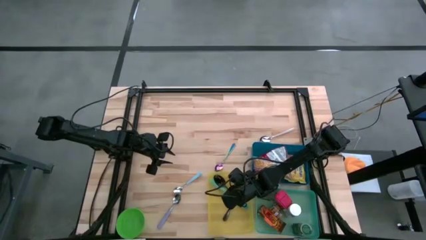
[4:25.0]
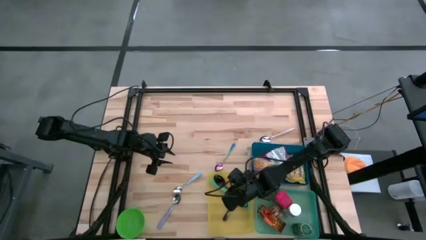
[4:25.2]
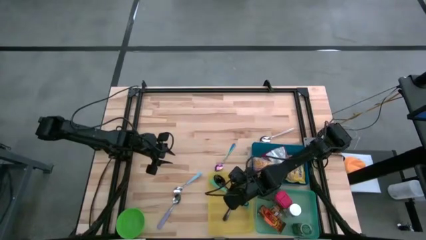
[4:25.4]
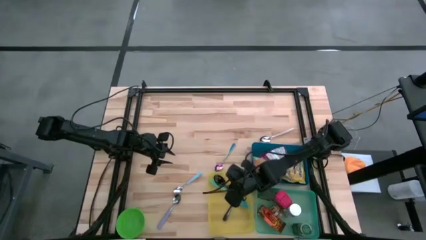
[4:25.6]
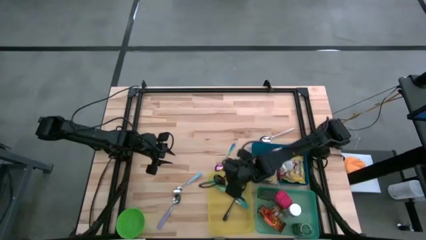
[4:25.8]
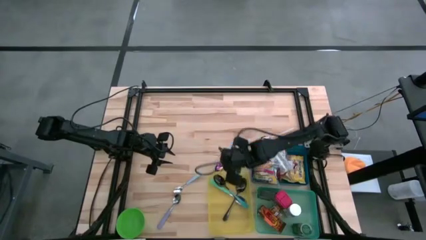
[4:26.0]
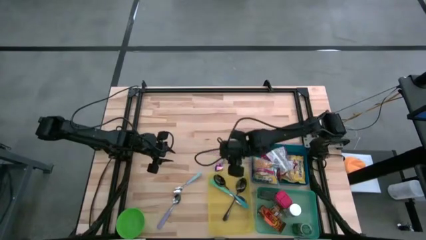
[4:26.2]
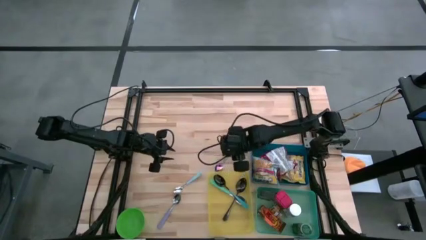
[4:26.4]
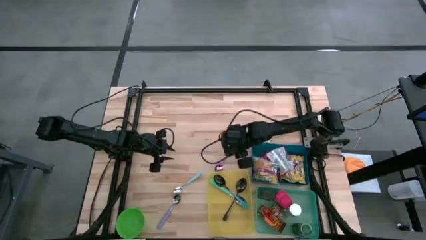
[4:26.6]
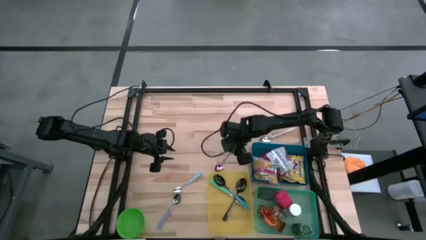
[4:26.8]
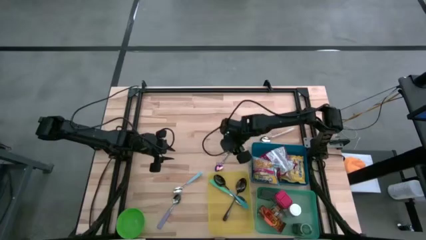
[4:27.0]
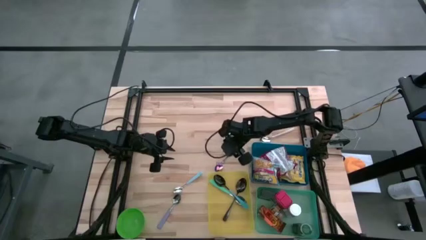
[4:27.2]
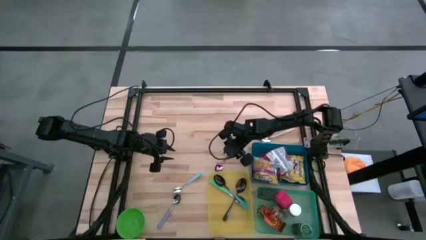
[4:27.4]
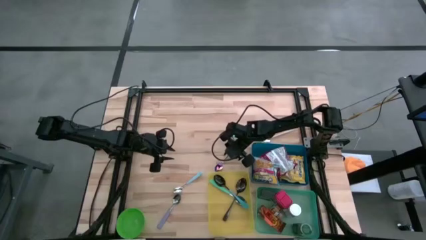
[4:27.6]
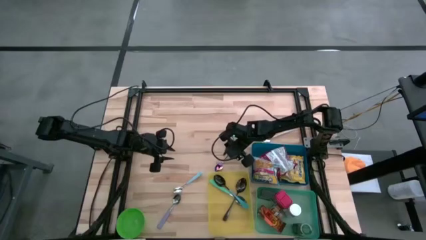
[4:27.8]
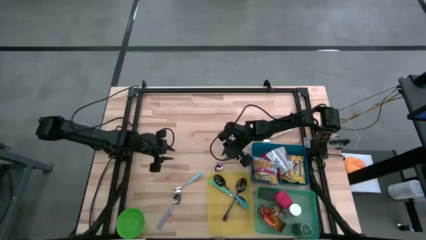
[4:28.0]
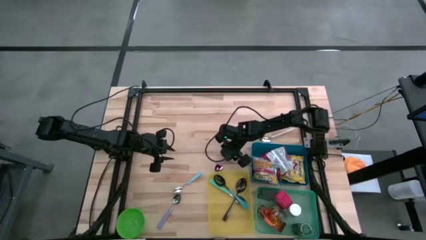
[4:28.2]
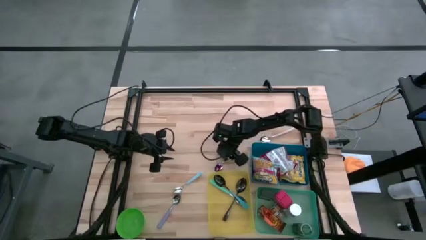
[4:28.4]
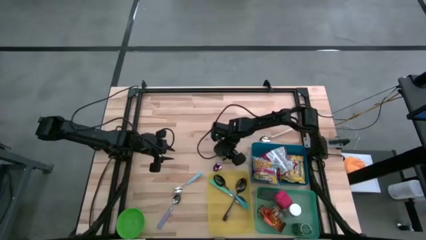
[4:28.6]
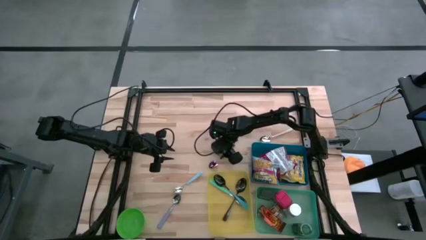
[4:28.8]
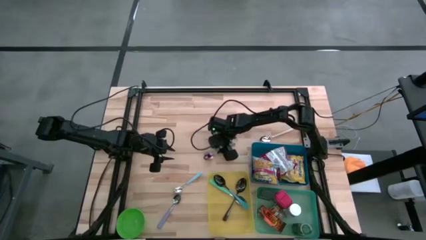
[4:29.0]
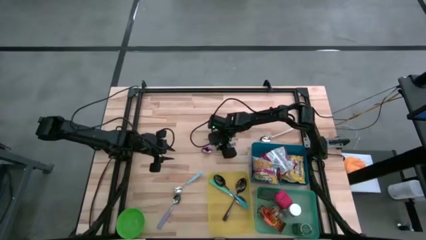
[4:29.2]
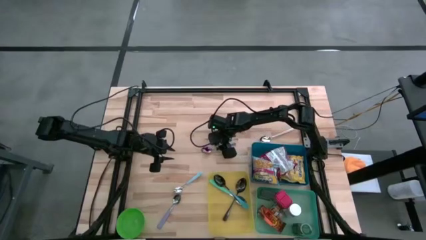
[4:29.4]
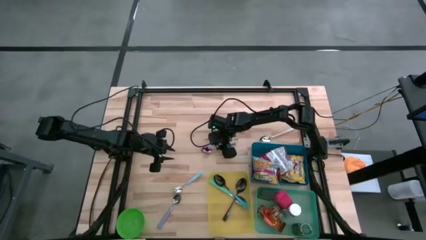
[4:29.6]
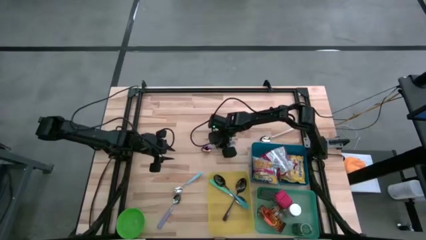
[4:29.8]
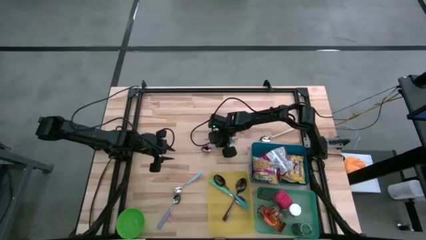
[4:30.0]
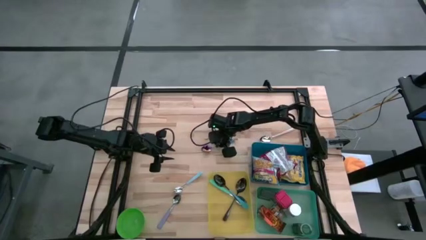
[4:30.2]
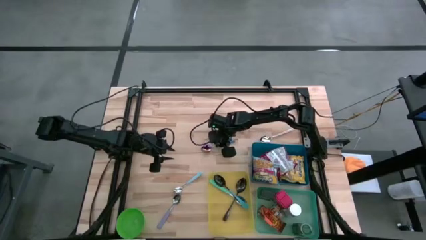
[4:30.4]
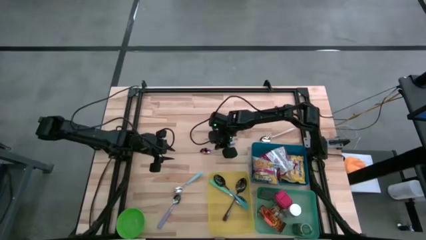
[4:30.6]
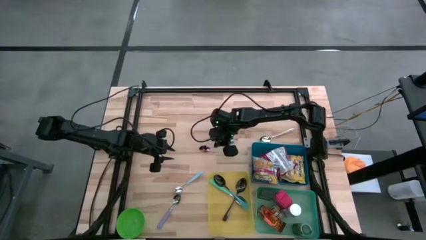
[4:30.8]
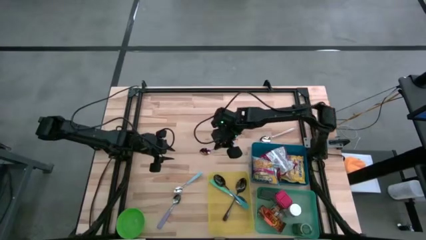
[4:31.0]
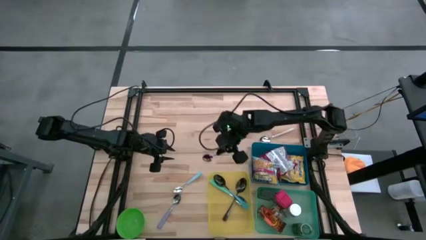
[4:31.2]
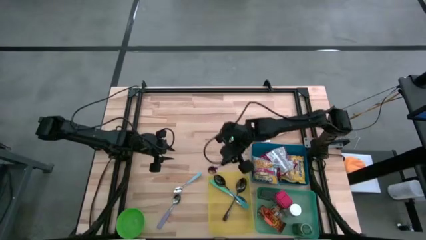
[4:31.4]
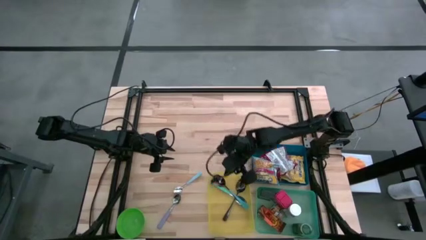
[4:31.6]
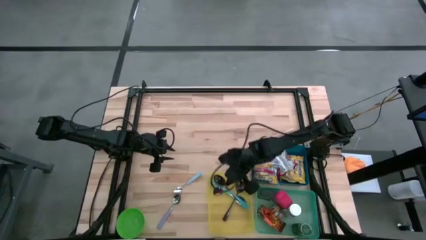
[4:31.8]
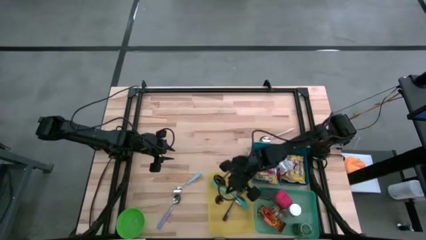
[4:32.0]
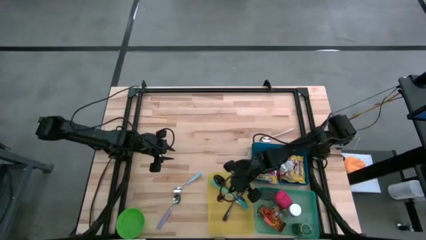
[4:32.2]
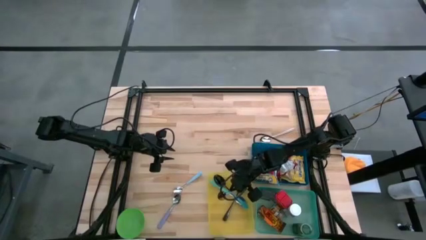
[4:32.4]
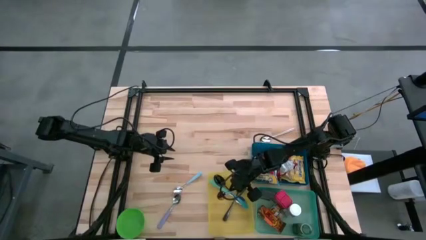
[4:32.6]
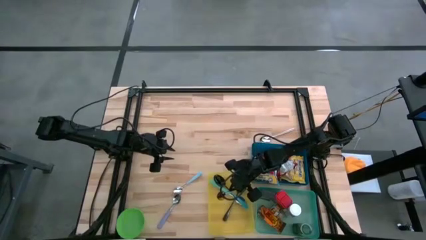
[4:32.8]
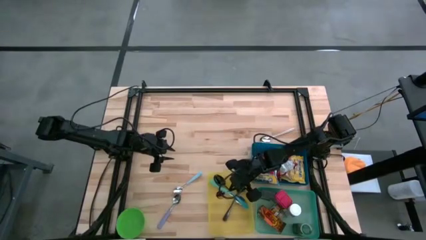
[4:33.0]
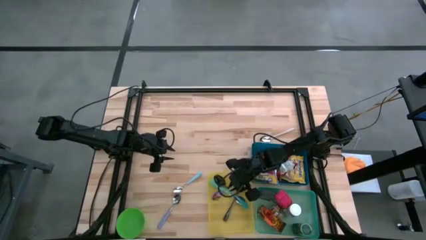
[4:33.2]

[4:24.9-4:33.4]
Put the purple spoon into the yellow bin

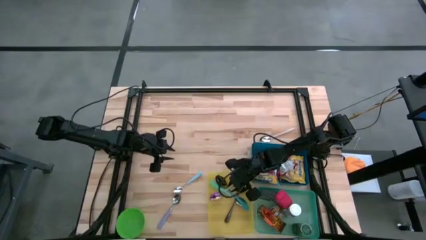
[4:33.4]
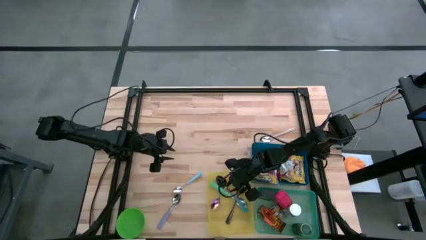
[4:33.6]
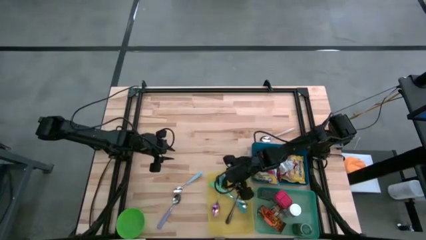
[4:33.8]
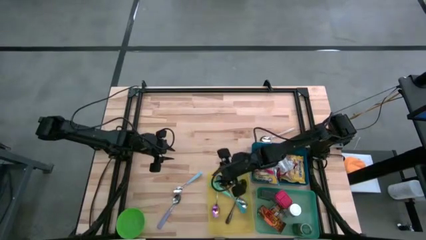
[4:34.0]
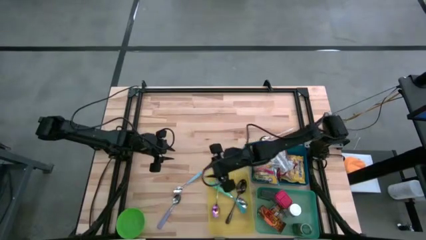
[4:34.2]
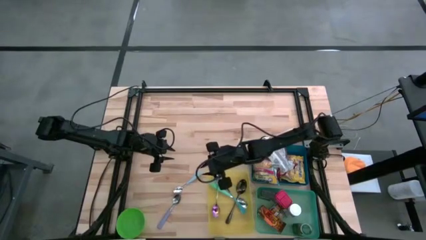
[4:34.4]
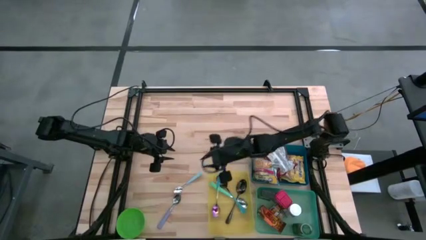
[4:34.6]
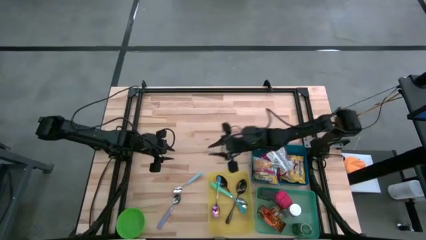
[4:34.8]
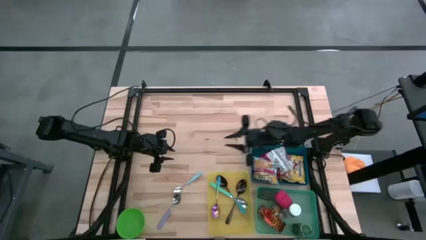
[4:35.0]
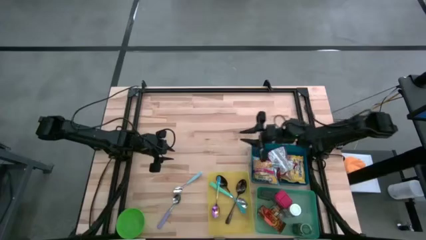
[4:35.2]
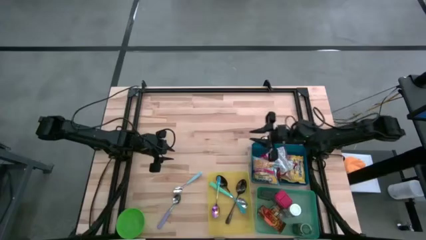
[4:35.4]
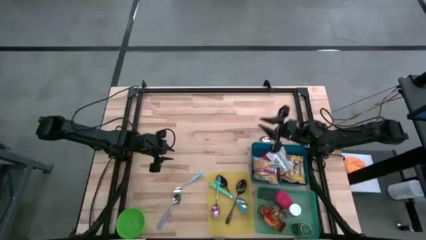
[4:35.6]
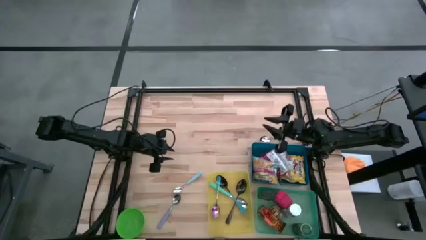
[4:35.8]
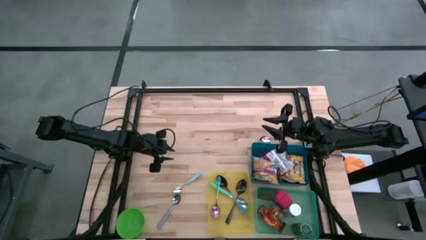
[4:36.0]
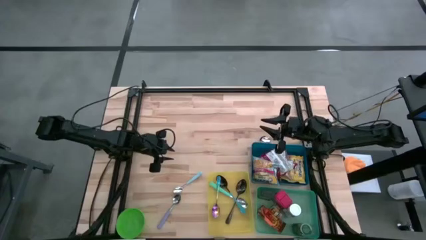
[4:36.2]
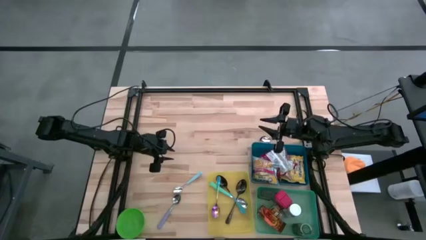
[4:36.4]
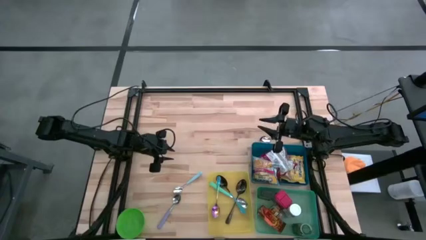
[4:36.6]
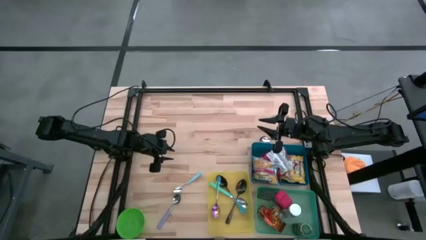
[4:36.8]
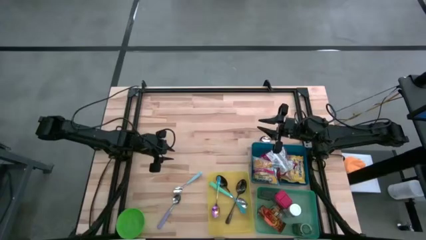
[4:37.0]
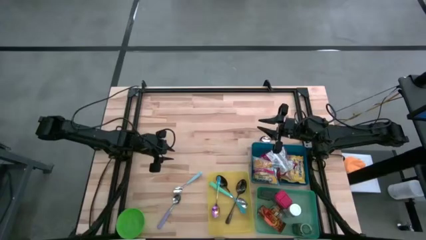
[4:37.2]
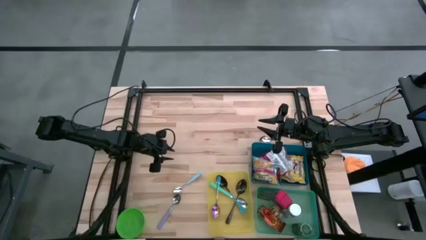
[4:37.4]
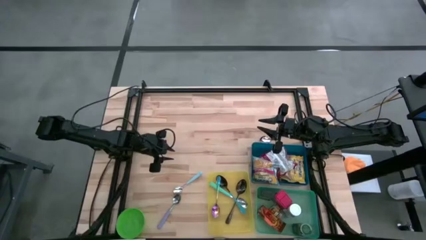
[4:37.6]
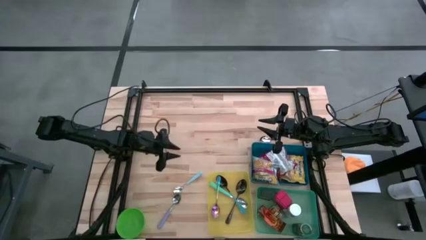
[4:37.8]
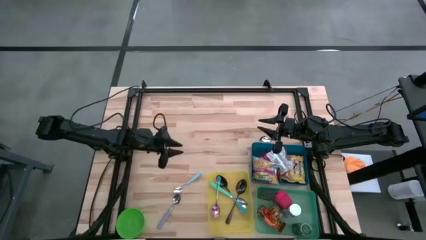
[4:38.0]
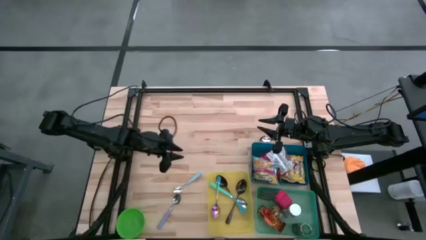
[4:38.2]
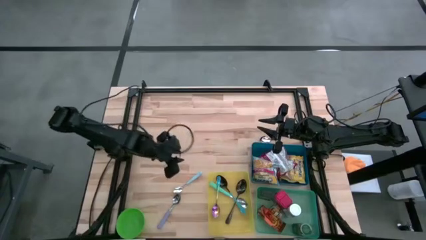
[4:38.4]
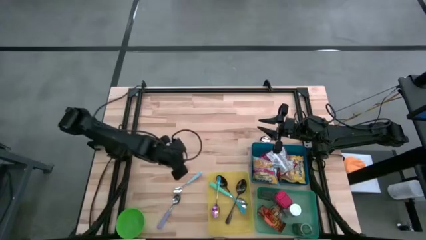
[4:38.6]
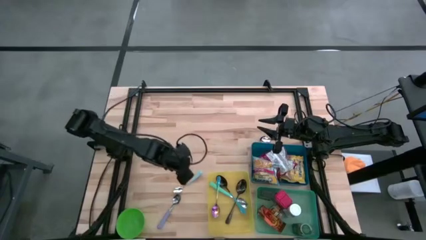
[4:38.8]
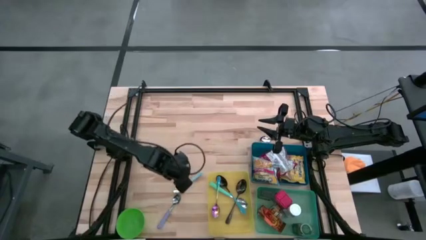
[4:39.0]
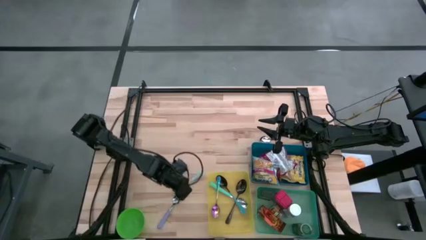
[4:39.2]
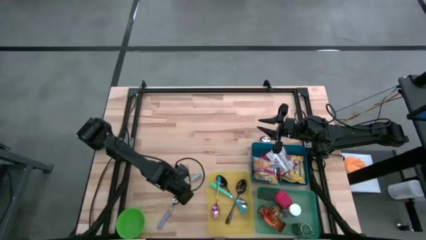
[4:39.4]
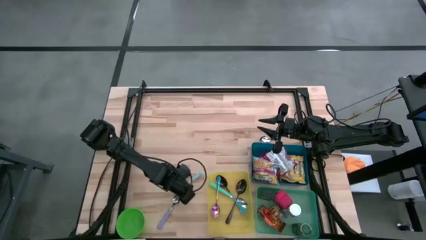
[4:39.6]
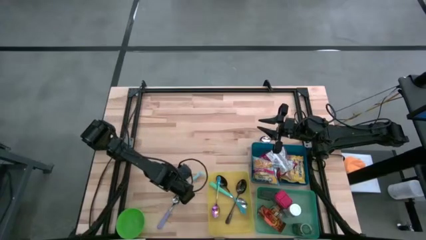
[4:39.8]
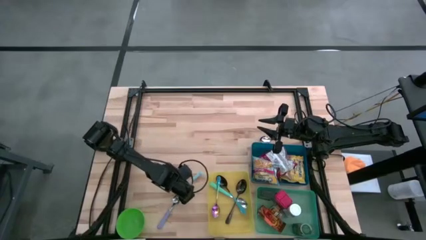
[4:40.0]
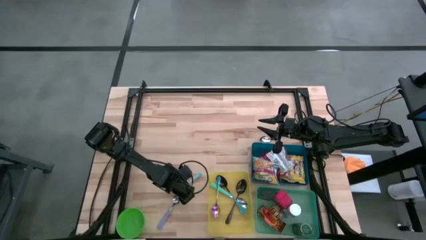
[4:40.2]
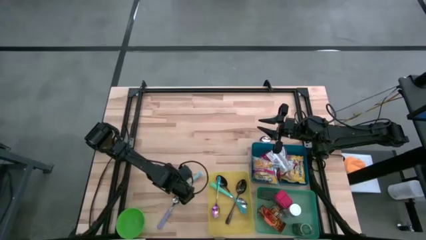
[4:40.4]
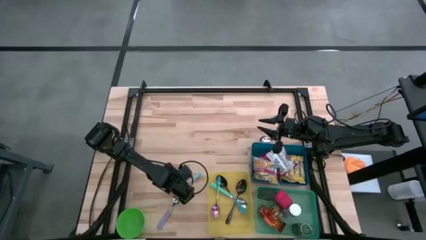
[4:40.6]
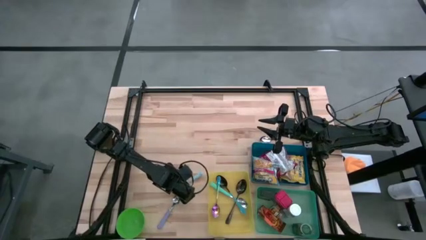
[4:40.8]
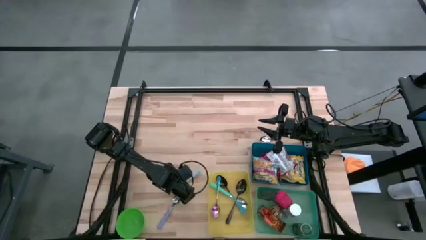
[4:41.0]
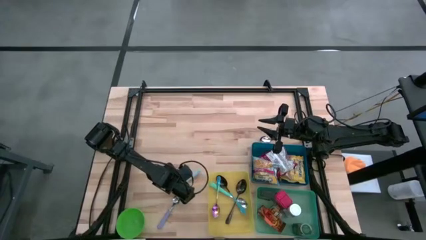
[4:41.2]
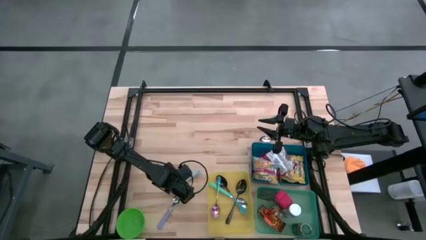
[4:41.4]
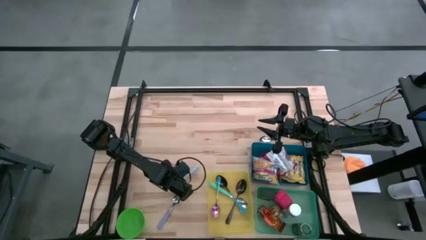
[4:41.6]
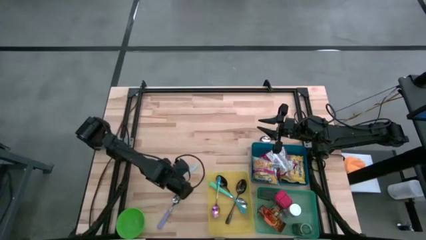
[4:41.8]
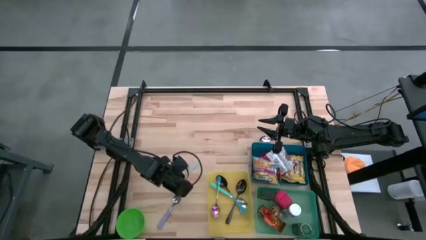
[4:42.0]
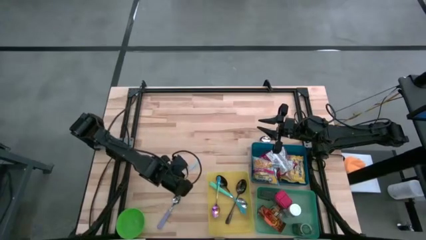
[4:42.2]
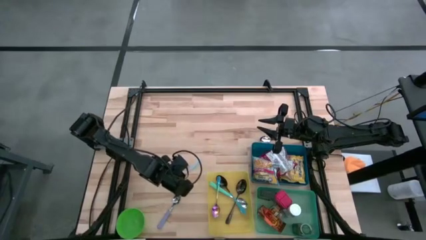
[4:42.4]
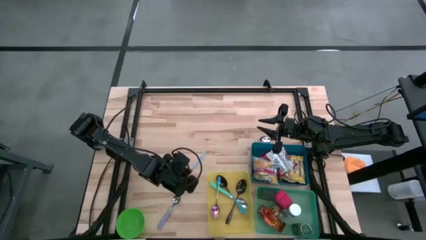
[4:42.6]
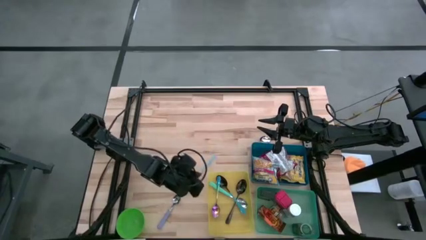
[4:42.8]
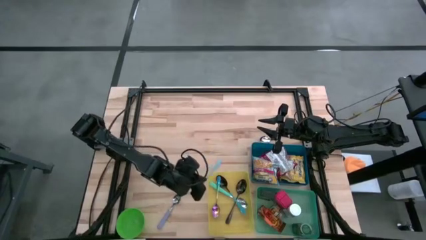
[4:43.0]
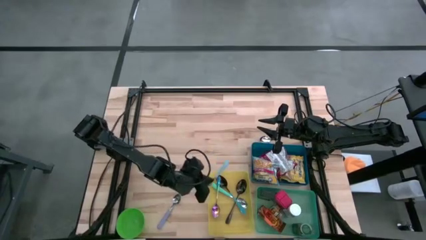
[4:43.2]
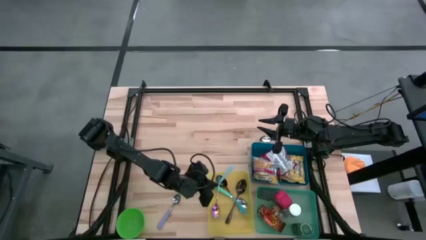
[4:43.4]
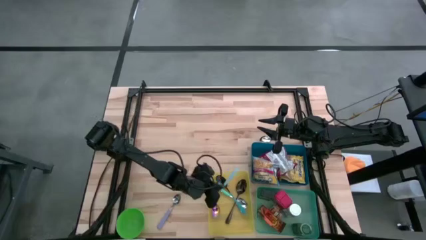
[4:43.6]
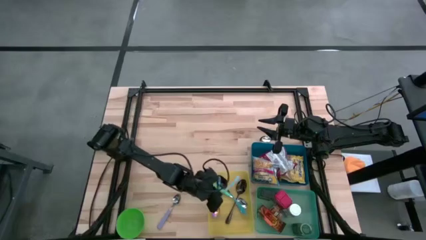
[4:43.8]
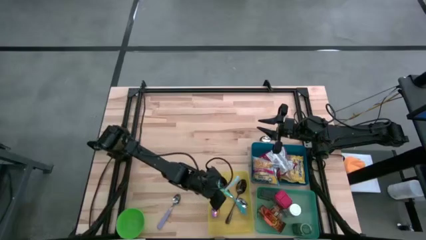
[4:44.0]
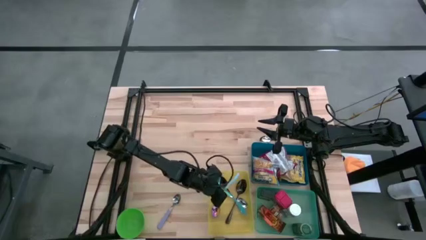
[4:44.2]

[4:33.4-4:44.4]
Put the light blue spoon into the yellow bin
